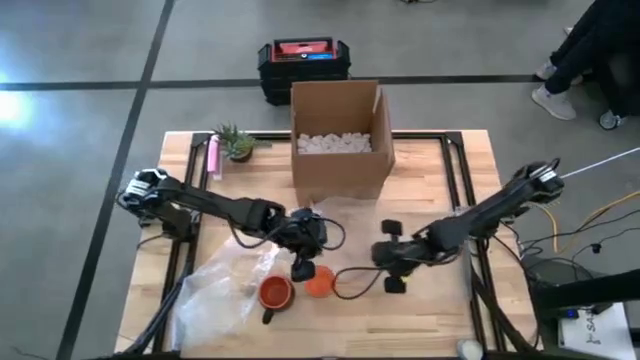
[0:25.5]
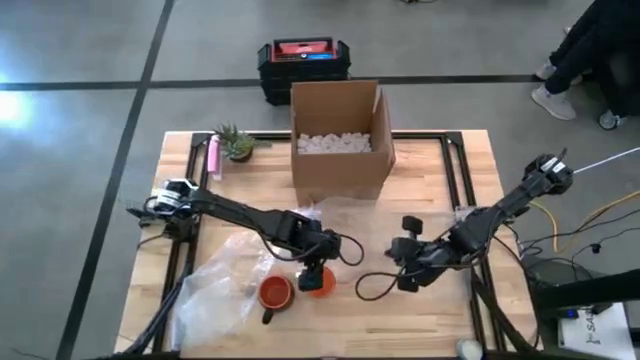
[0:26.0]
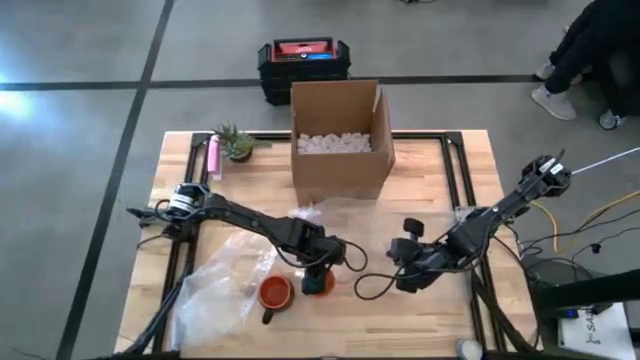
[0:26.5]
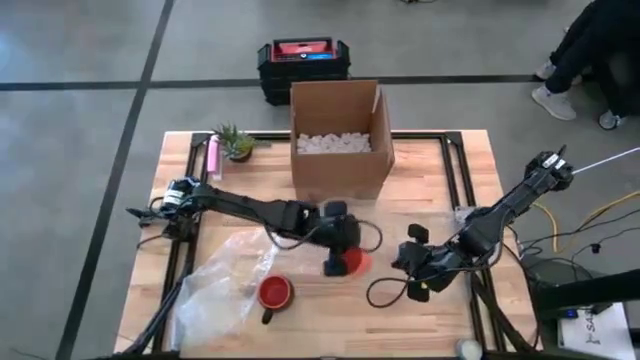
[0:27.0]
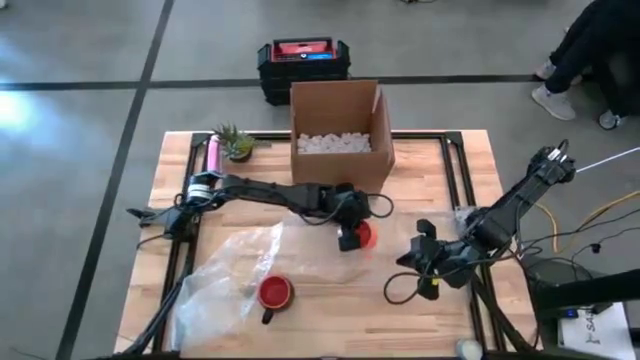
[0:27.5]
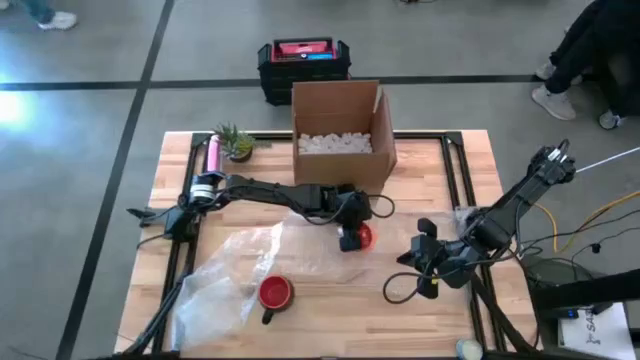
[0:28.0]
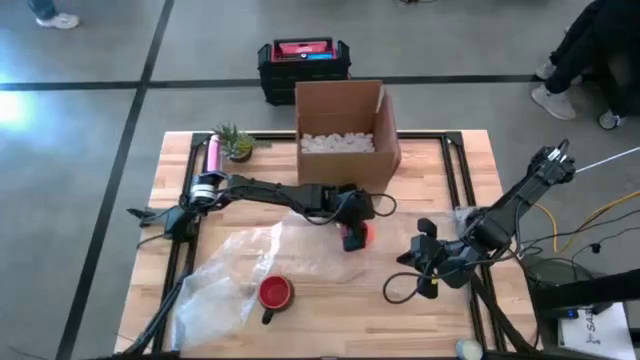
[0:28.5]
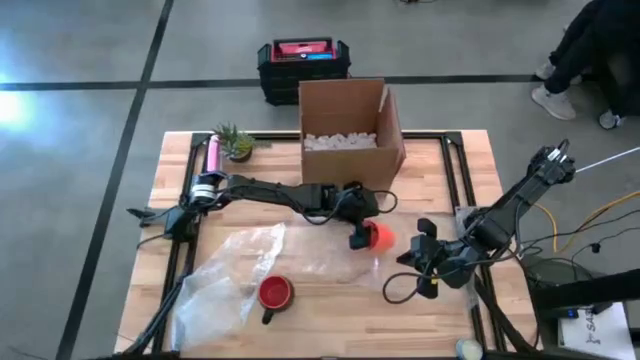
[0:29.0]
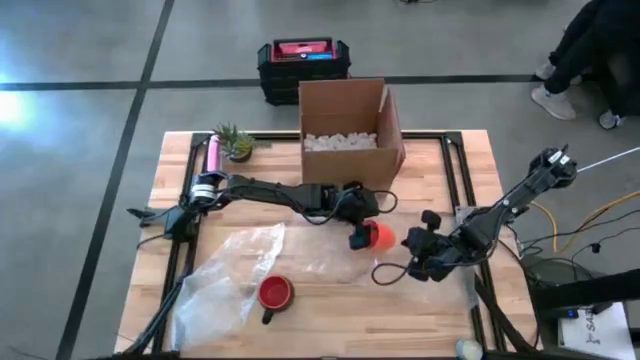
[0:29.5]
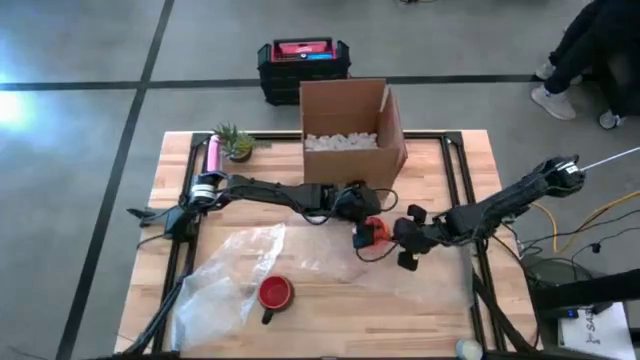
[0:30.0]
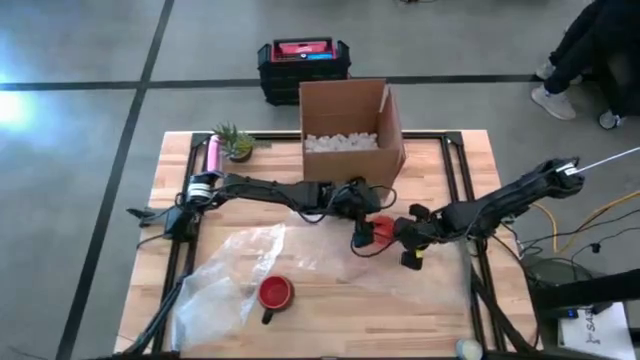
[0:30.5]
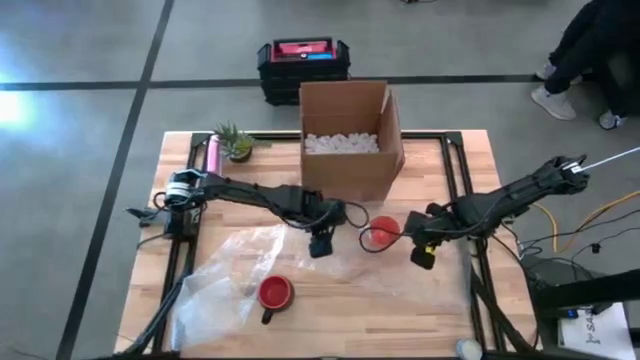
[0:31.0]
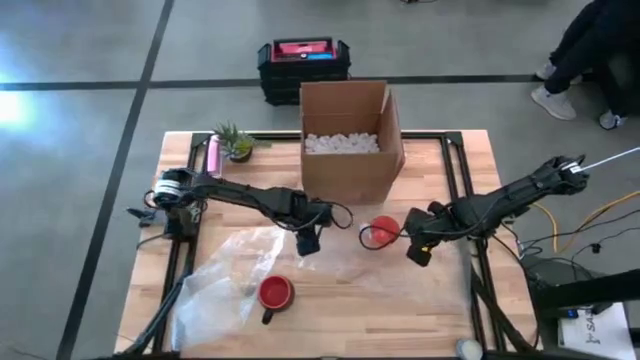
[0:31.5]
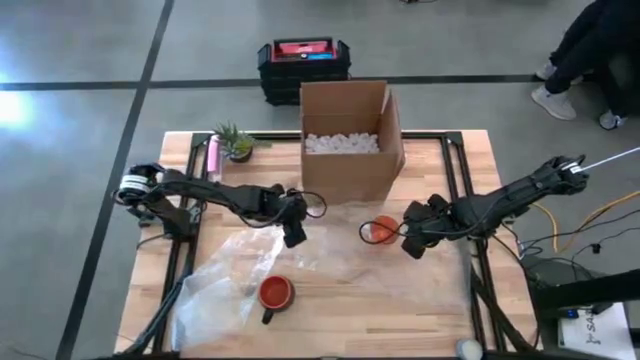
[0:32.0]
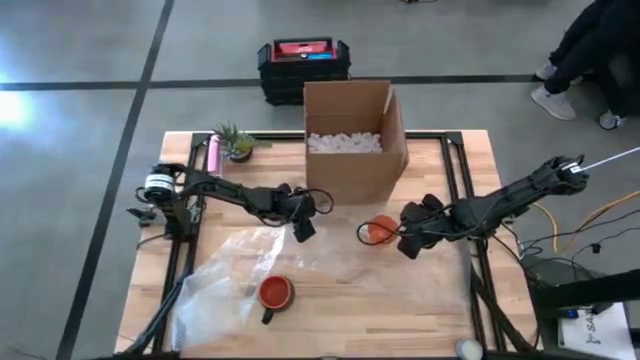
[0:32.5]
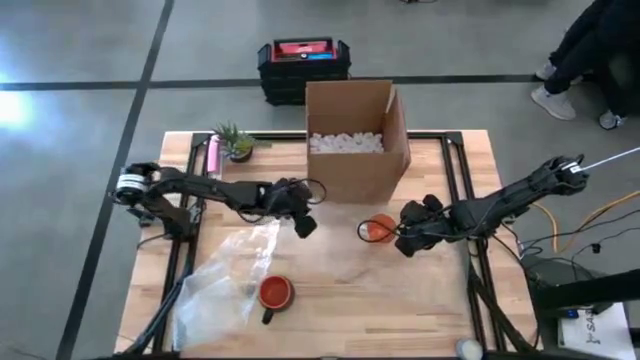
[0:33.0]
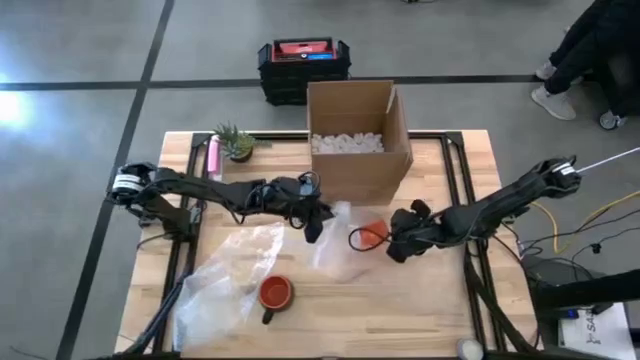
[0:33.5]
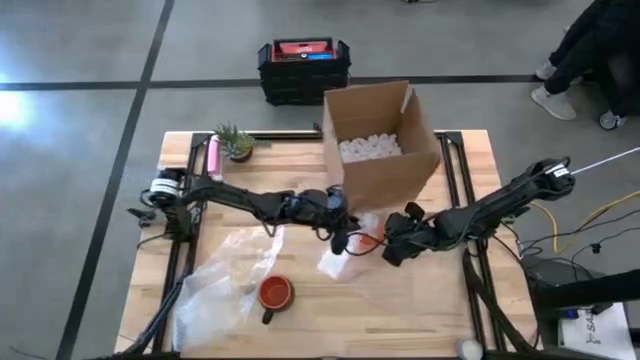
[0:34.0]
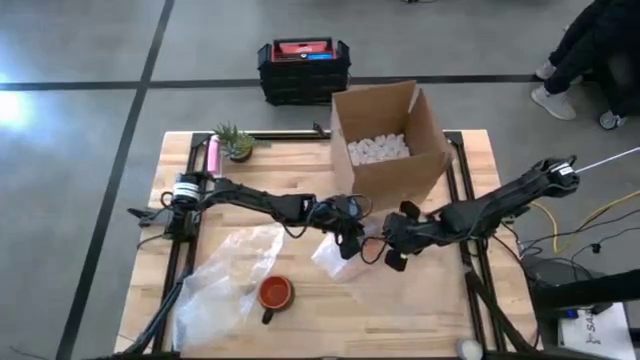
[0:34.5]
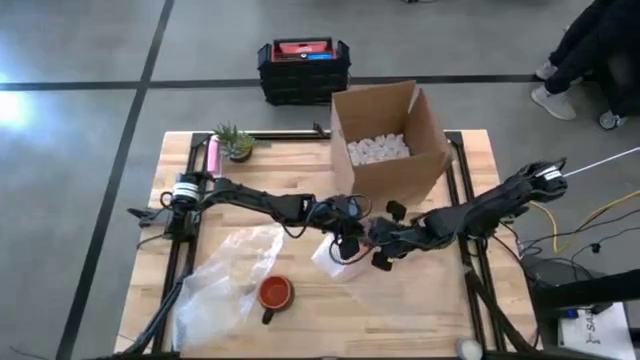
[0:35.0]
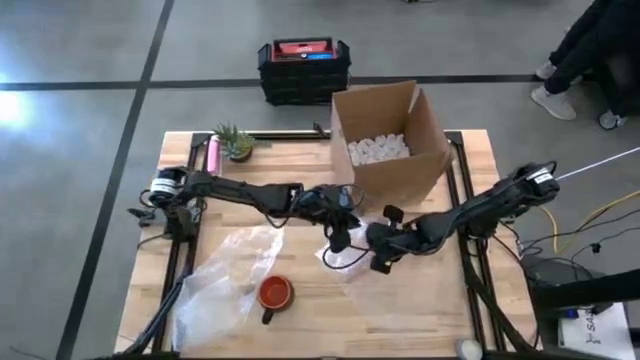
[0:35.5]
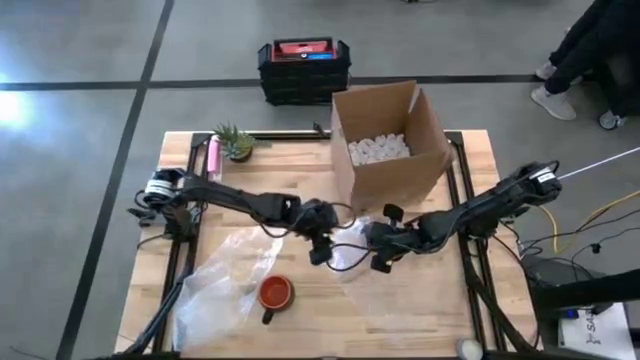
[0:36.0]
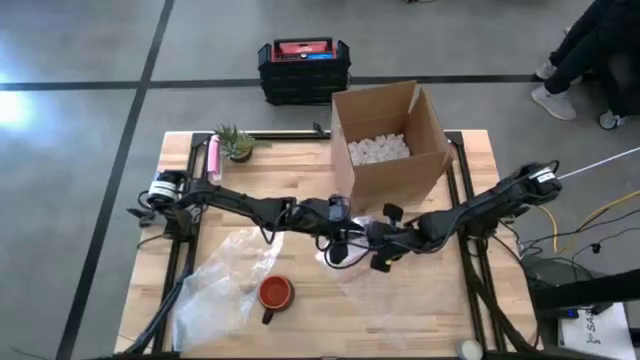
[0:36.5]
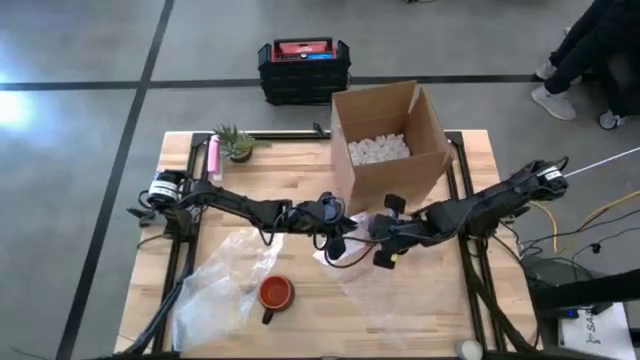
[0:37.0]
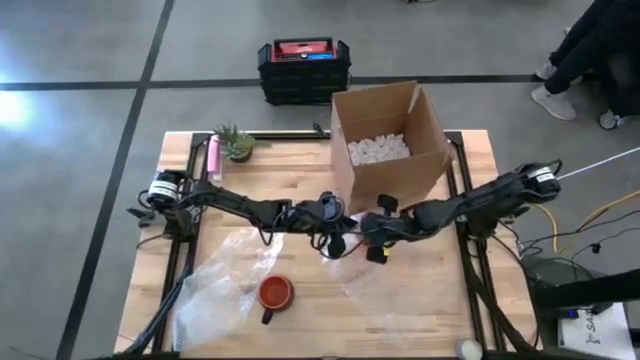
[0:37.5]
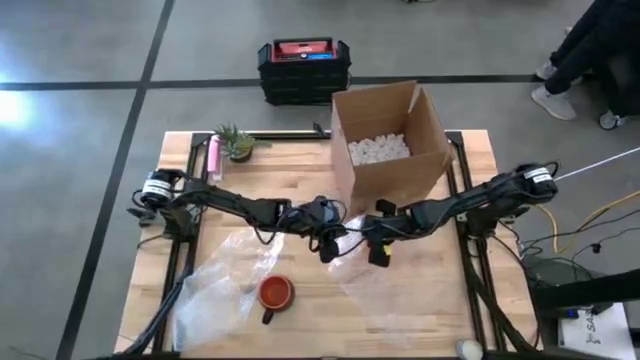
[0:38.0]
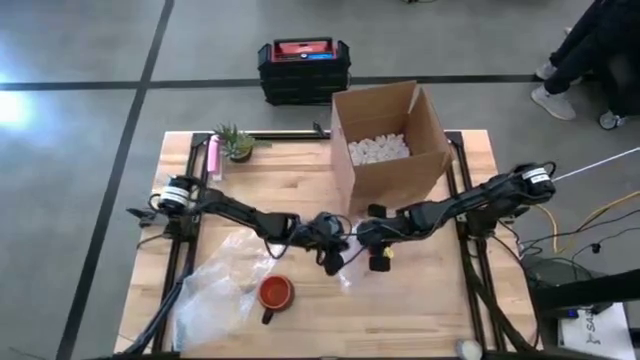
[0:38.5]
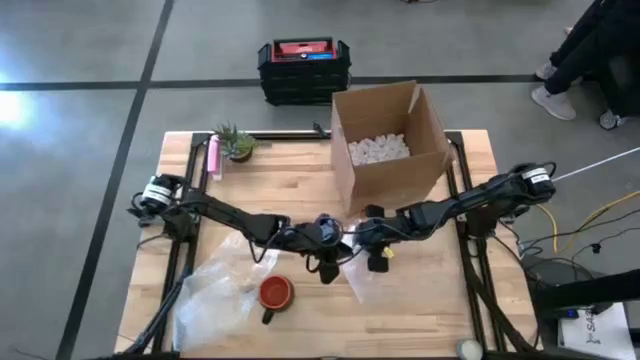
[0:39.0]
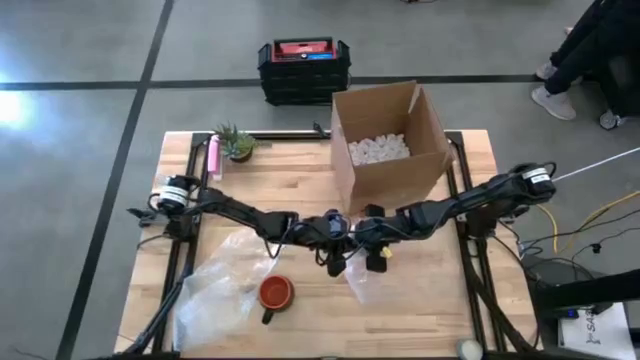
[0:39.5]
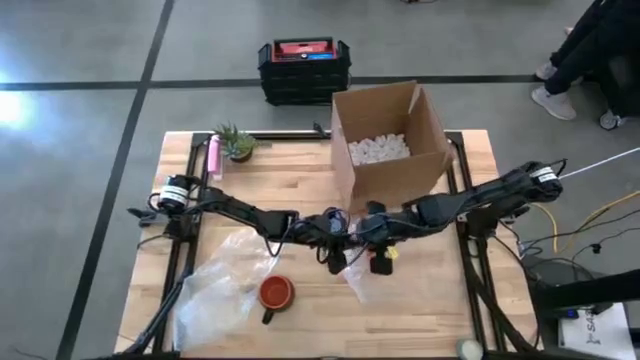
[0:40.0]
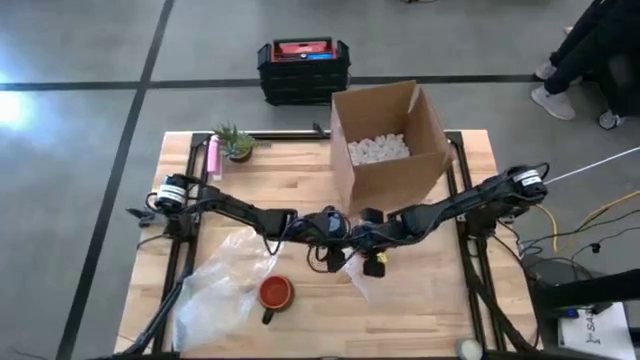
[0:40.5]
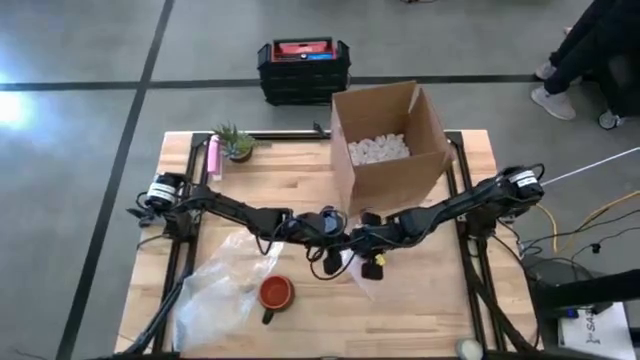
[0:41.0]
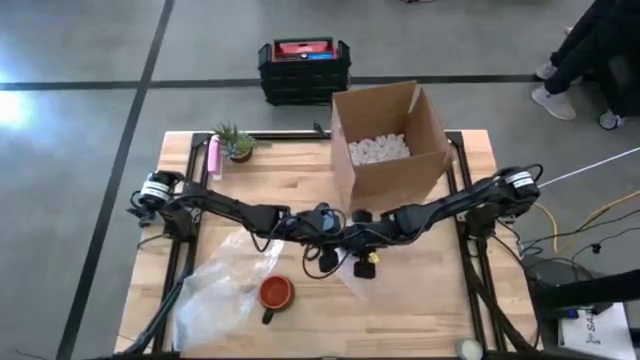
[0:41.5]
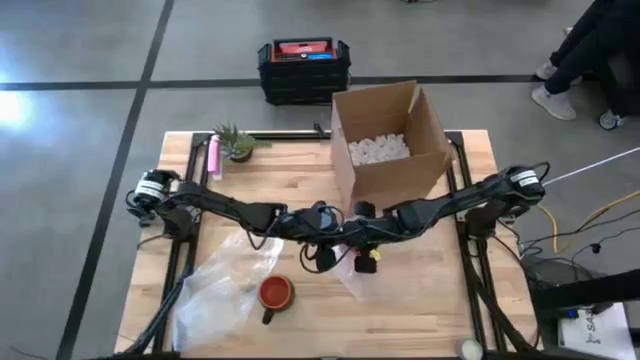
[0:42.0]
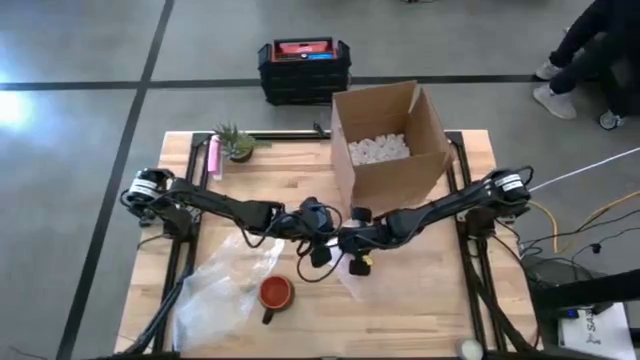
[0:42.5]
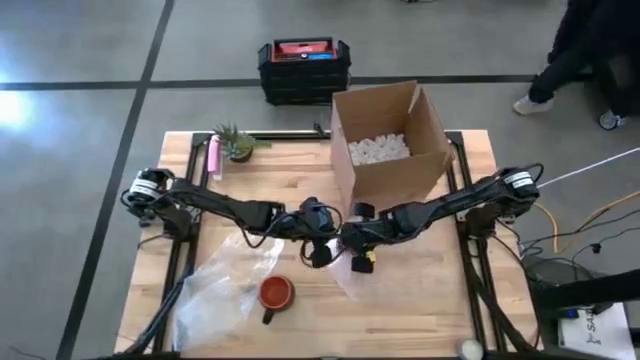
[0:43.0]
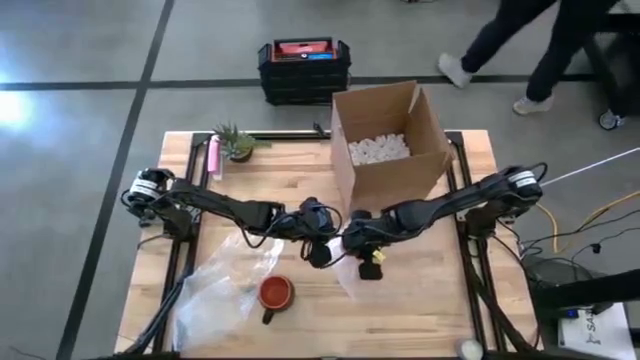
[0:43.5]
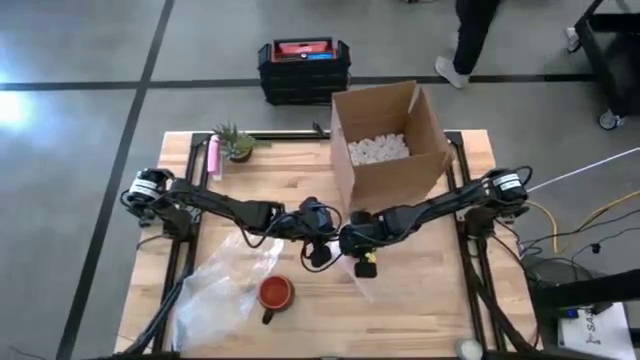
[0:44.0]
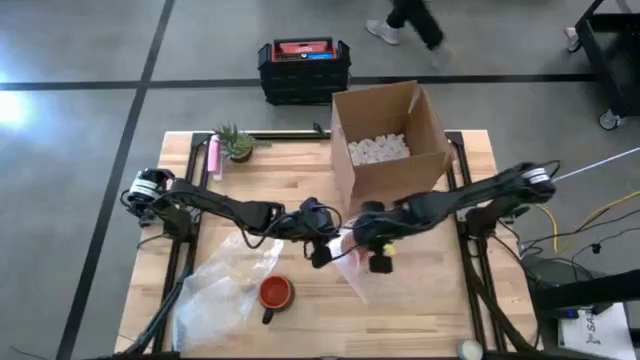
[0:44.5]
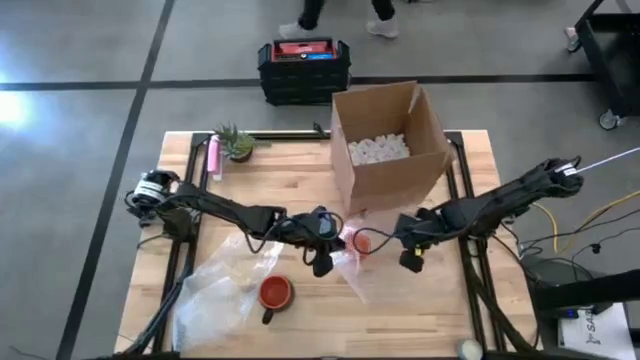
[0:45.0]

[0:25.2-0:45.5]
Task: wrap mug
Wrap the orange mug with the right transparent bubble wrap

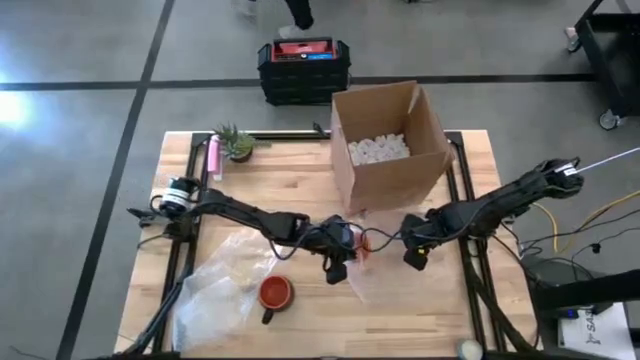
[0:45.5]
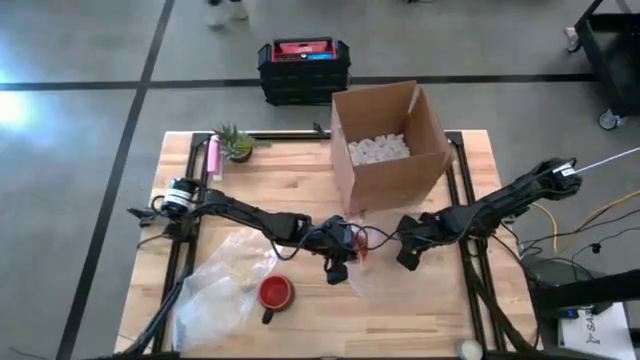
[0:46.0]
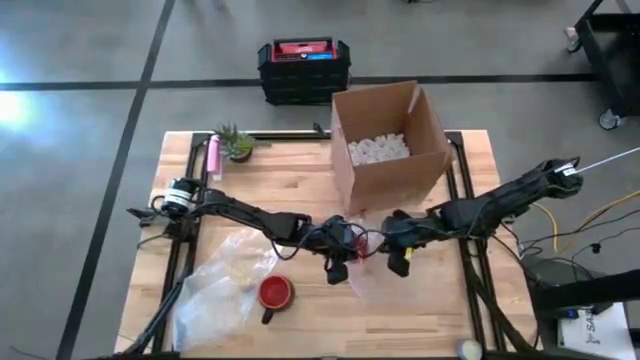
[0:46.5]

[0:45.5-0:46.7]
Wrap the orange mug with the right transparent bubble wrap
